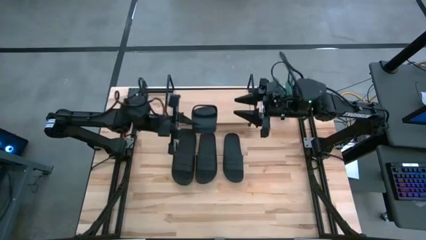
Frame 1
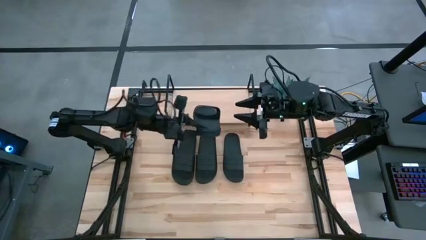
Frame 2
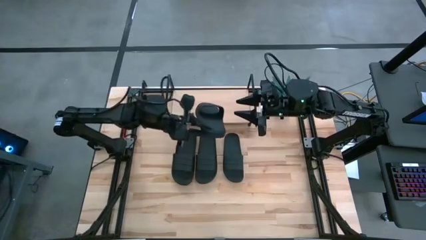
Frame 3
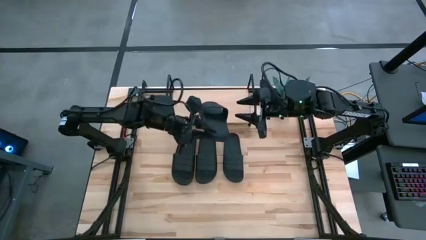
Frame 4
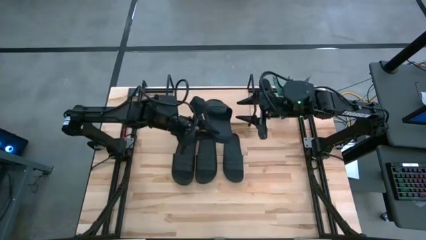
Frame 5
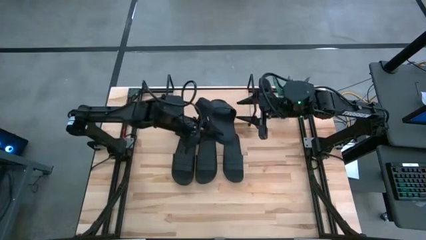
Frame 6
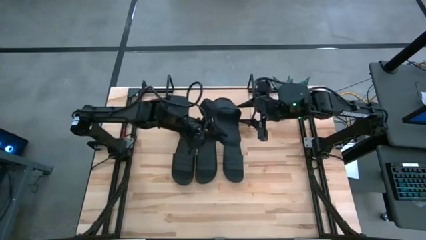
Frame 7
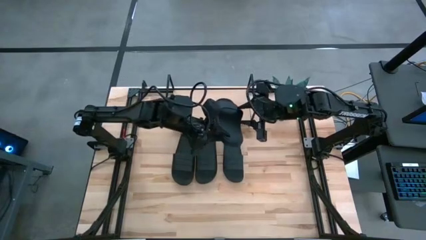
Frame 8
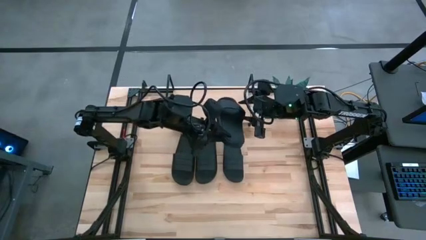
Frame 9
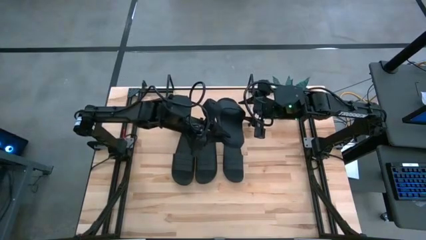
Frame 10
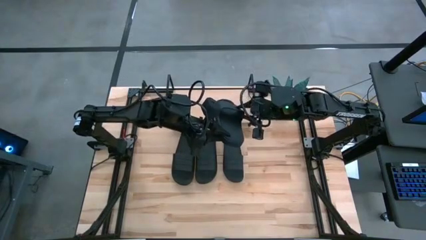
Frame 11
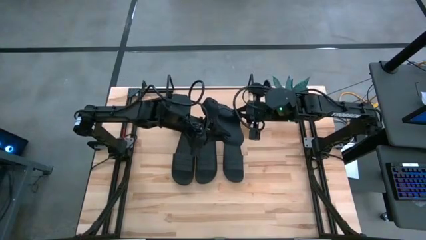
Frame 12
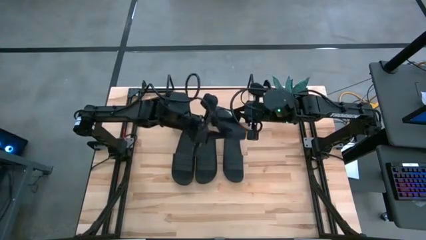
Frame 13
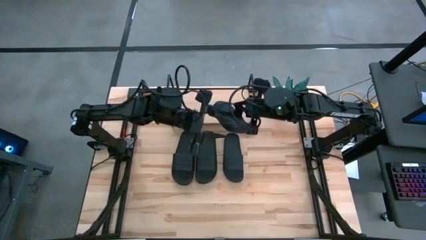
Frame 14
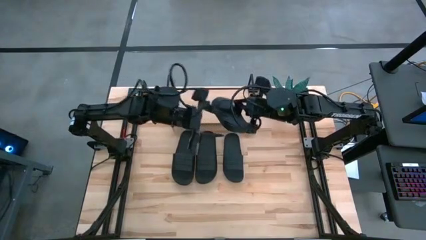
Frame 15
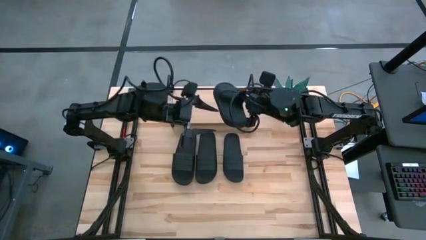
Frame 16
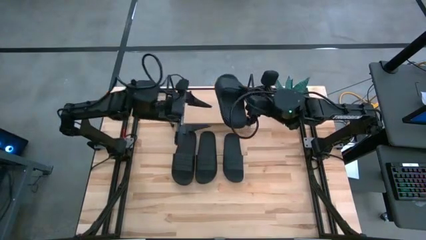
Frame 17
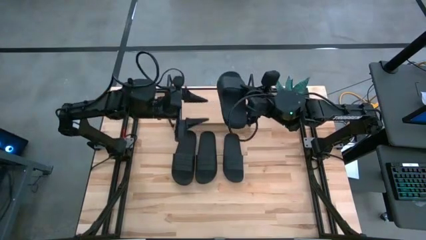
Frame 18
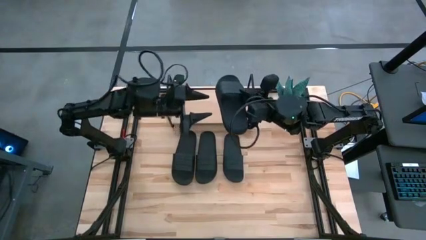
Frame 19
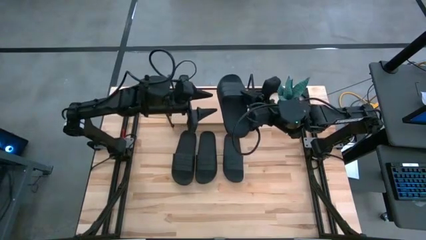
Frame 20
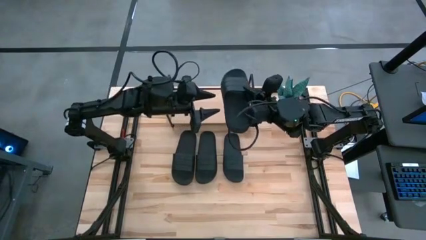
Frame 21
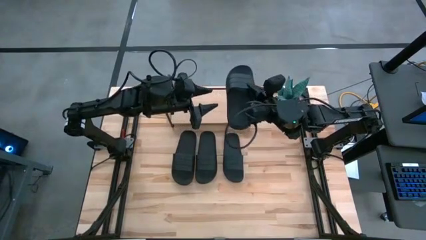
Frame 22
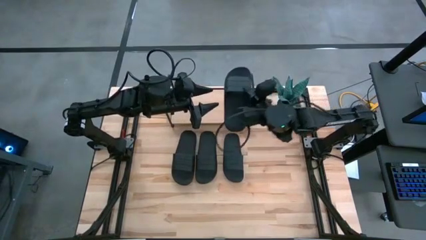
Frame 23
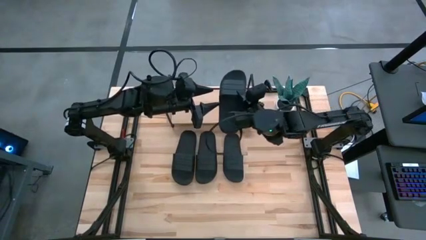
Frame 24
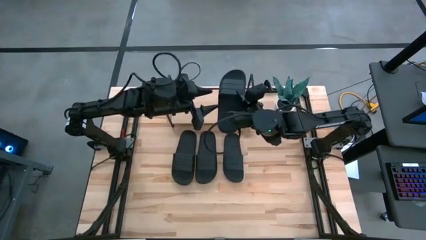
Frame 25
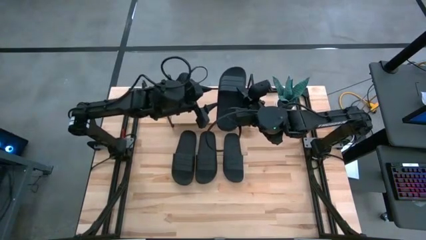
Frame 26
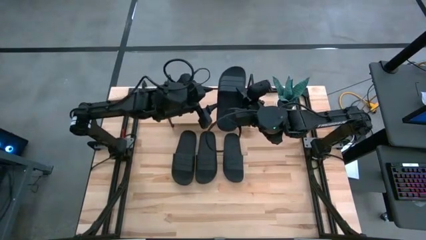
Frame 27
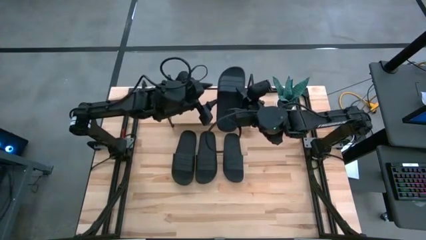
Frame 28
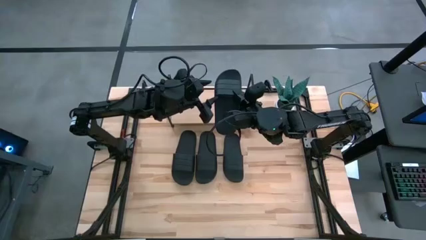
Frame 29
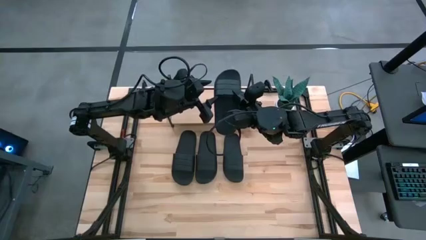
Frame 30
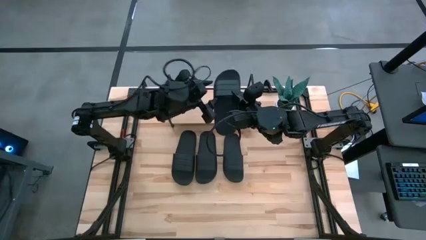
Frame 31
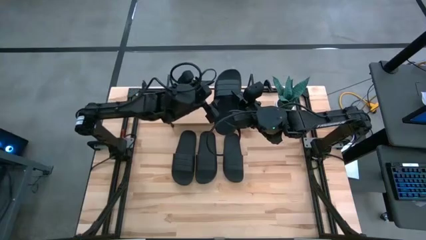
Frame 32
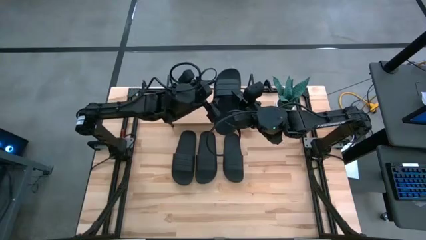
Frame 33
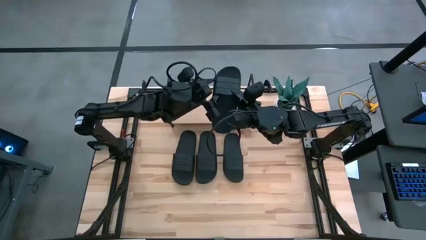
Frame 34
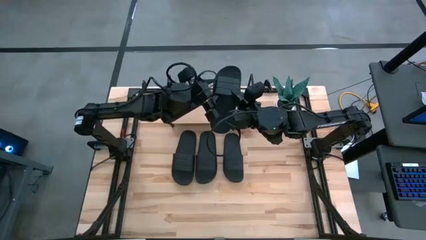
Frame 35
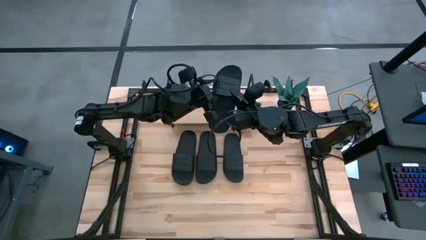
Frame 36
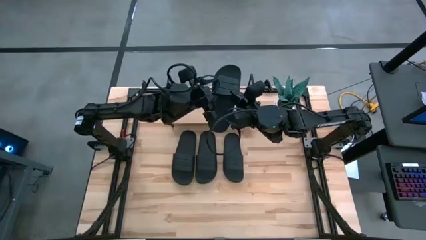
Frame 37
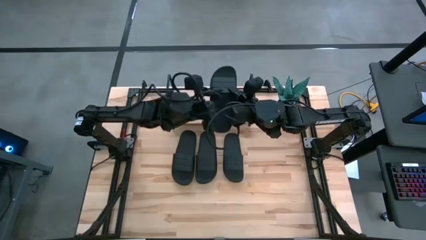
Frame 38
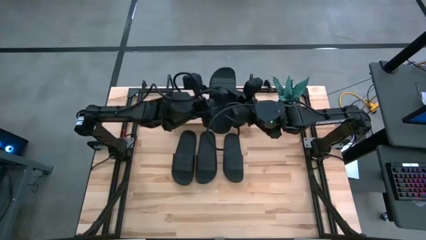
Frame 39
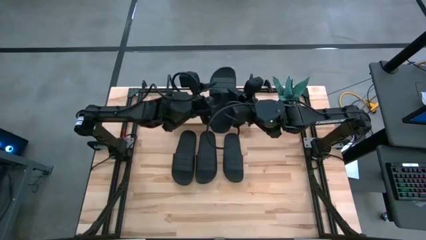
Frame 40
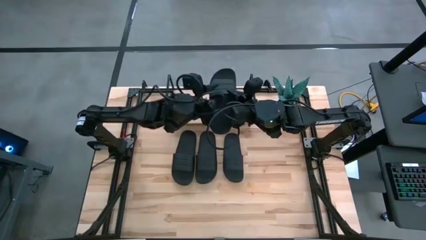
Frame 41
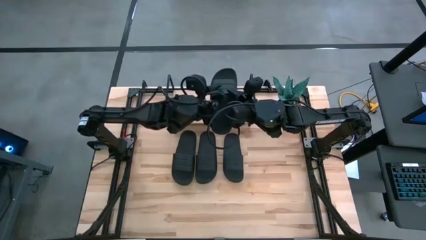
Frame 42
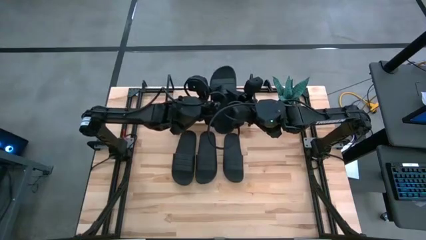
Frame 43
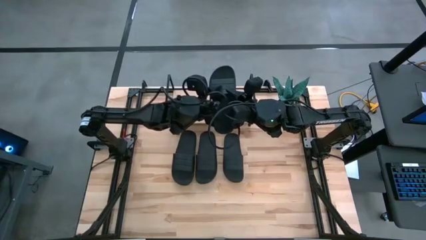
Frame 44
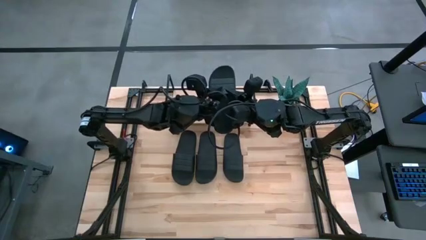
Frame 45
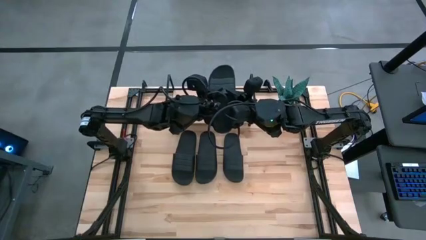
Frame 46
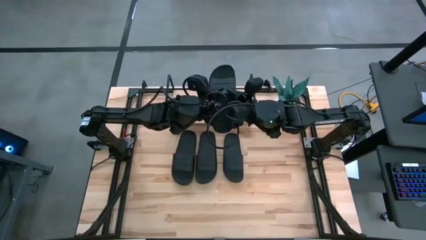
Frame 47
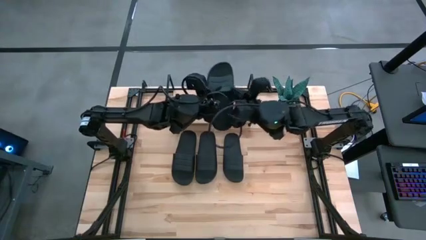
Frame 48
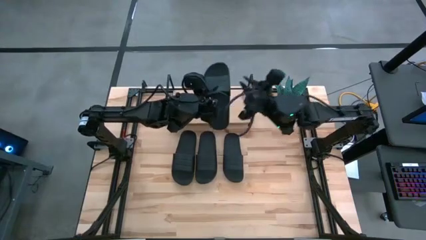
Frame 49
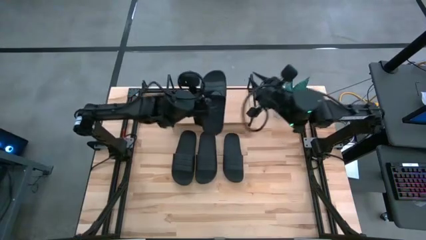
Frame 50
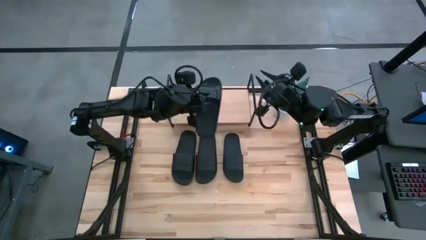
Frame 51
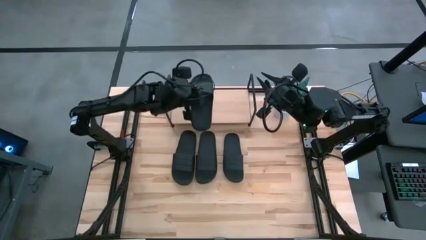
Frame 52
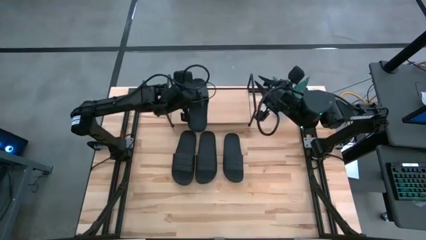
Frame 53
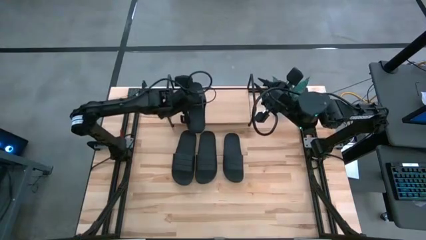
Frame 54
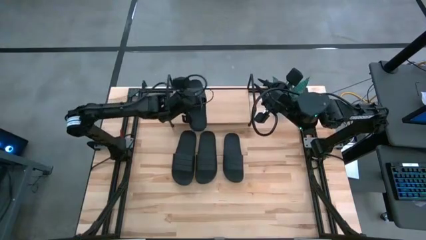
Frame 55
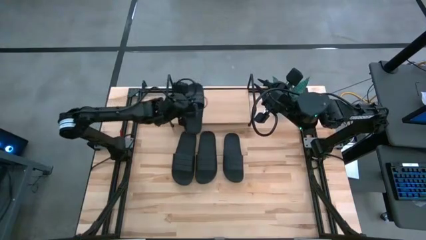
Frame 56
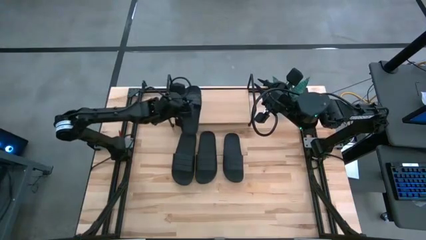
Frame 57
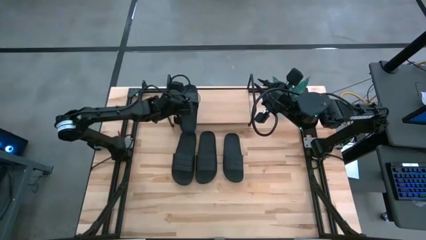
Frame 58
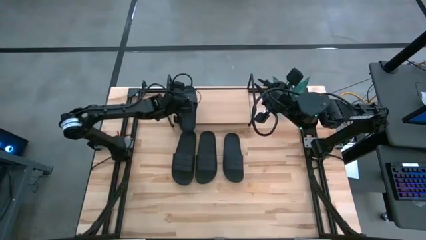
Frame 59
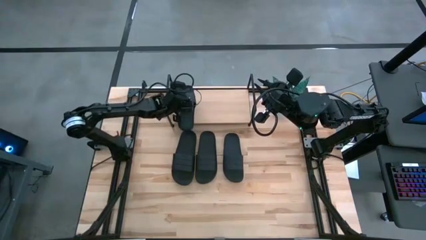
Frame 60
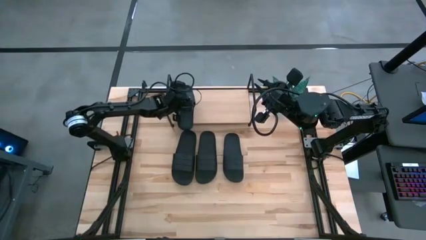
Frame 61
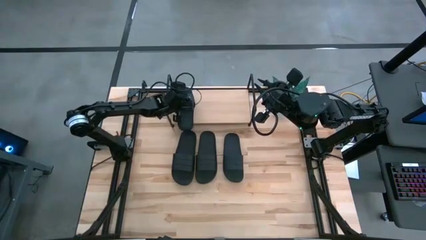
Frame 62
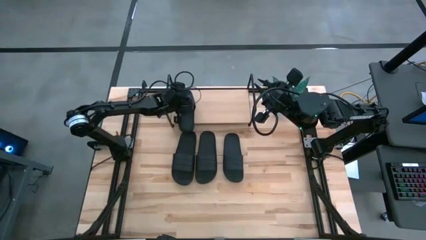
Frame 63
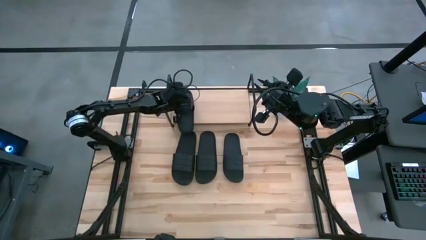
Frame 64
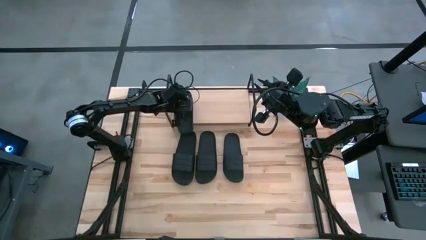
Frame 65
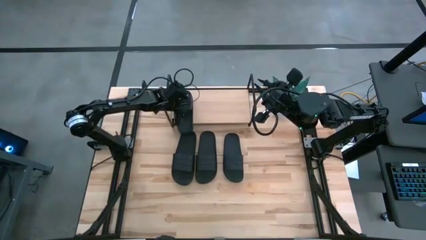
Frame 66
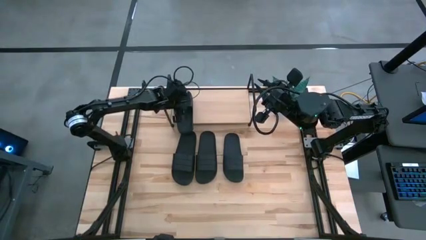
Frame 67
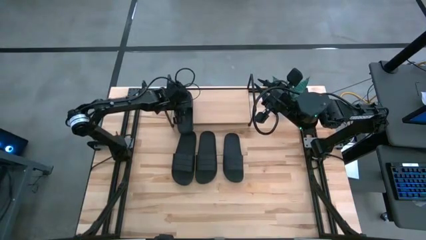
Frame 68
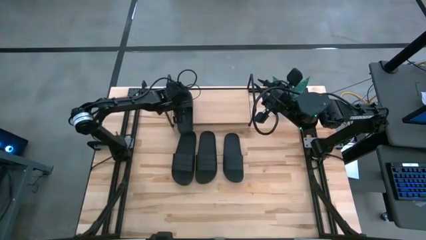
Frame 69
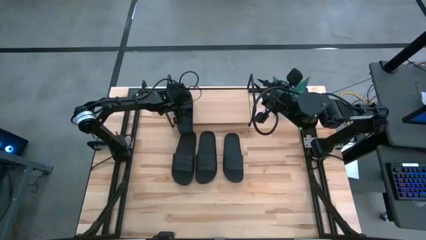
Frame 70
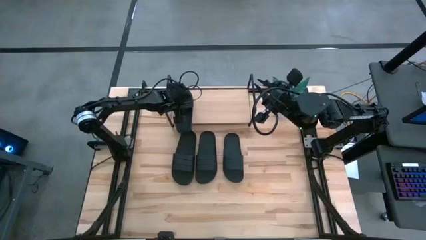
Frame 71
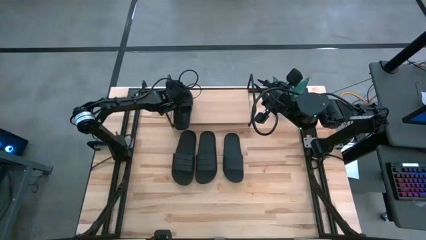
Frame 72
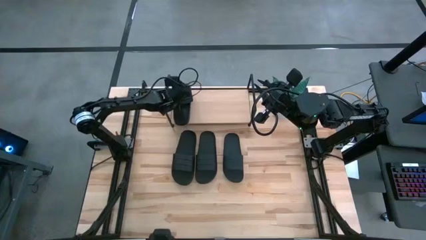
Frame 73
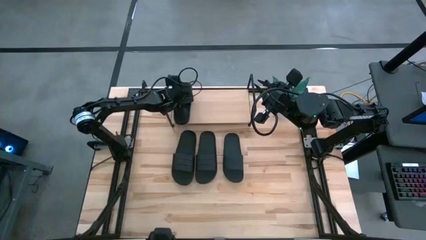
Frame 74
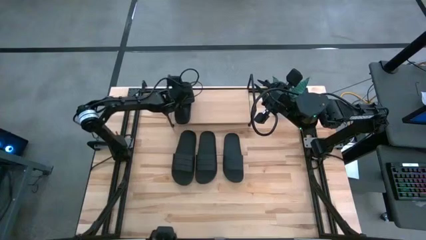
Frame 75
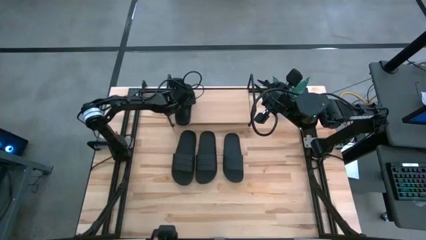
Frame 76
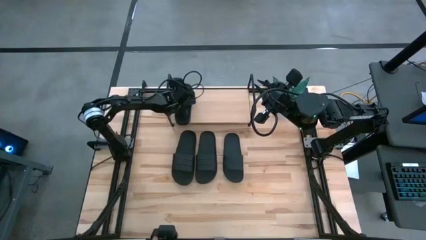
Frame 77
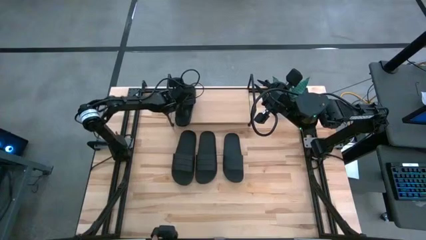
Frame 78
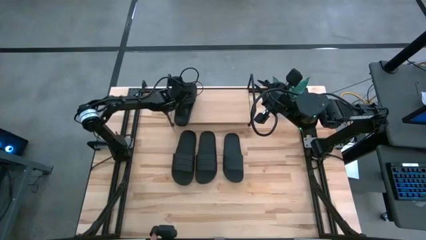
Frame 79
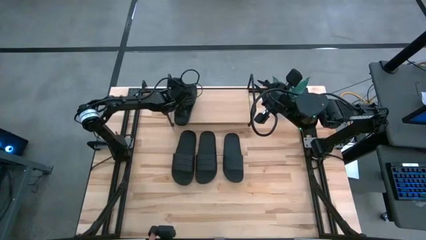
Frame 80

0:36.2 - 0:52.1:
Task: Pick and place slides into the shelf
Put the black slide on the shelf
